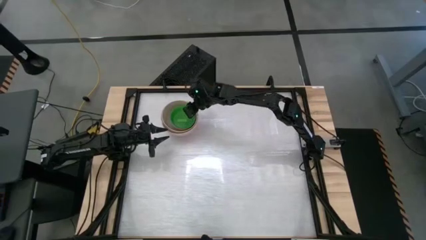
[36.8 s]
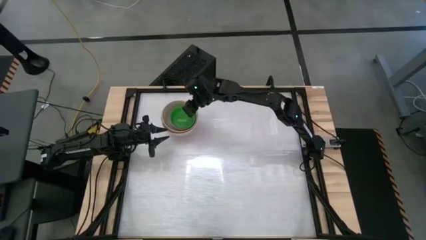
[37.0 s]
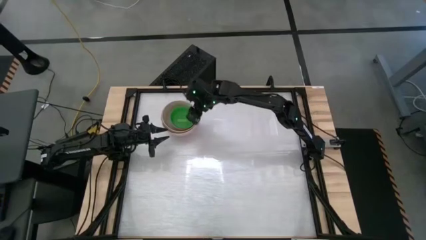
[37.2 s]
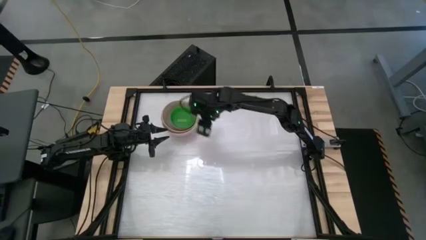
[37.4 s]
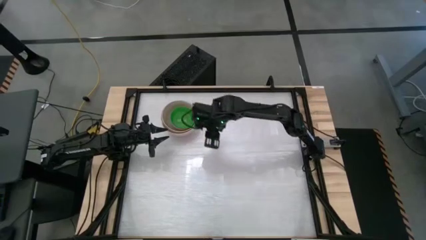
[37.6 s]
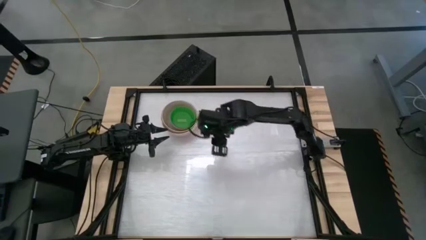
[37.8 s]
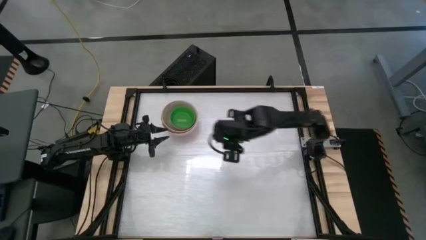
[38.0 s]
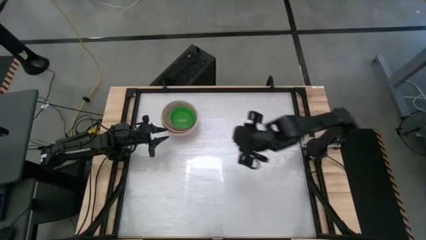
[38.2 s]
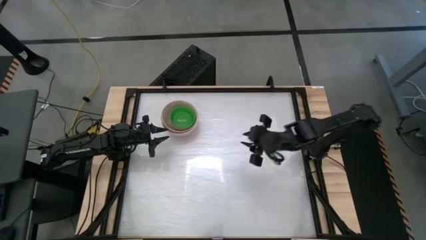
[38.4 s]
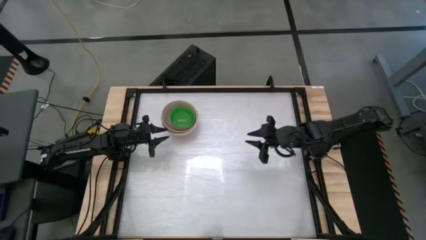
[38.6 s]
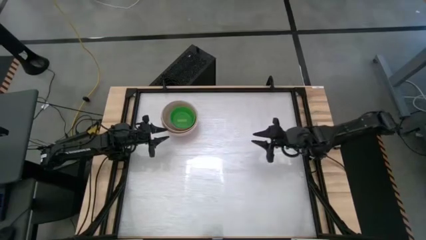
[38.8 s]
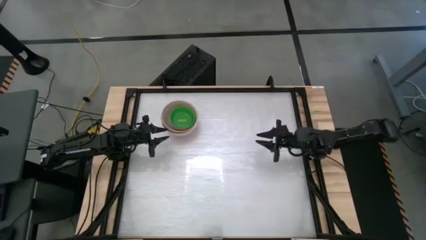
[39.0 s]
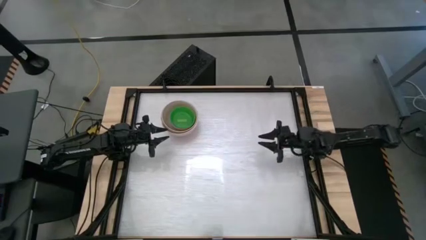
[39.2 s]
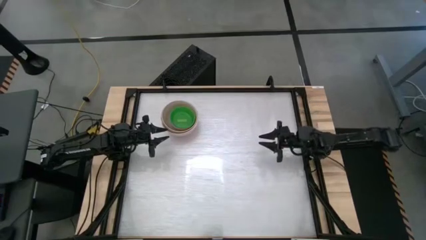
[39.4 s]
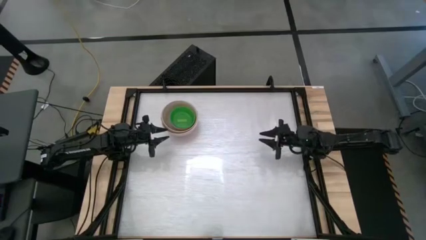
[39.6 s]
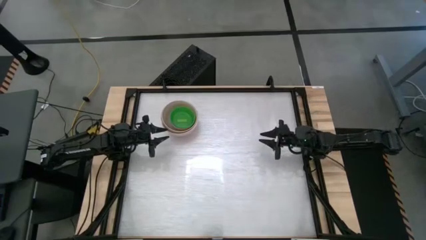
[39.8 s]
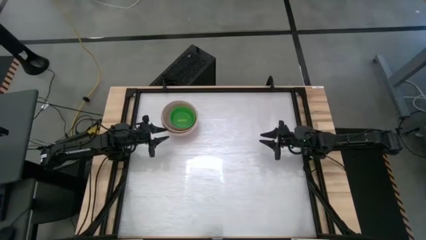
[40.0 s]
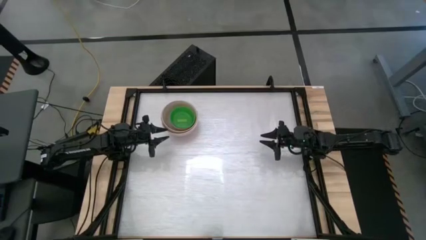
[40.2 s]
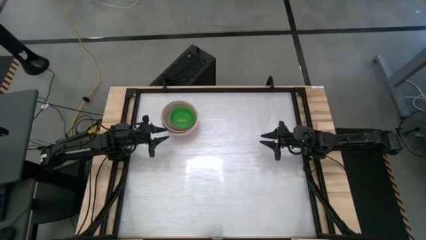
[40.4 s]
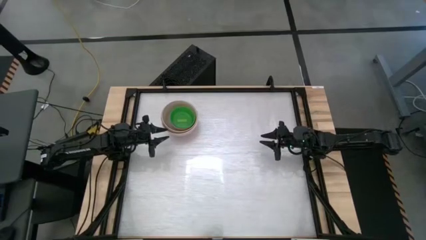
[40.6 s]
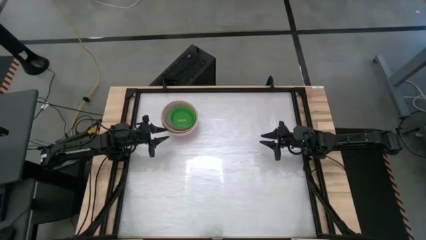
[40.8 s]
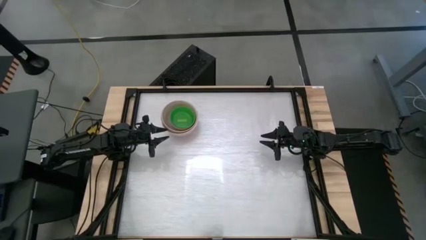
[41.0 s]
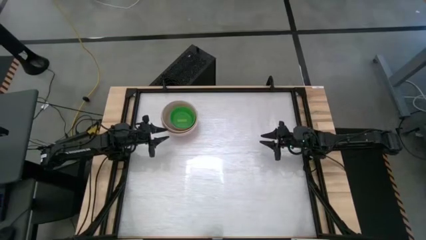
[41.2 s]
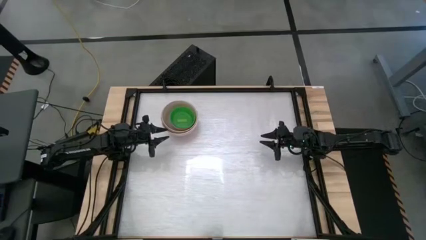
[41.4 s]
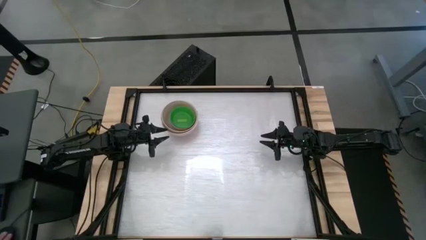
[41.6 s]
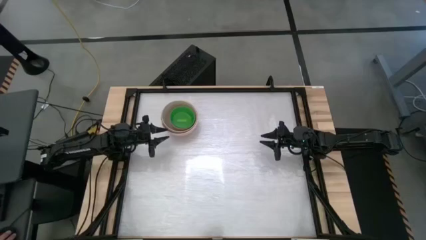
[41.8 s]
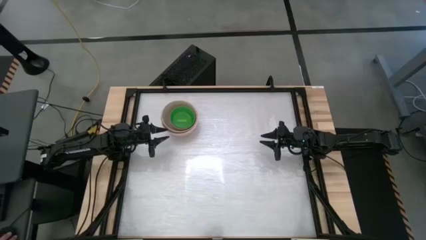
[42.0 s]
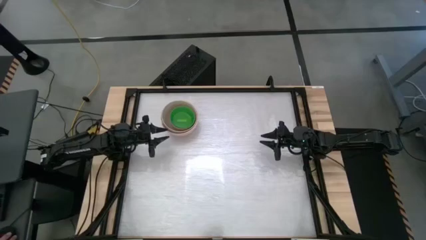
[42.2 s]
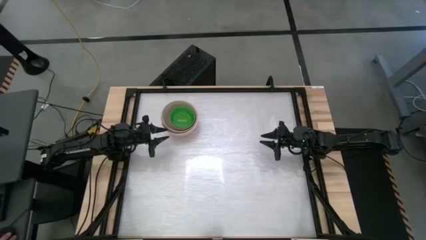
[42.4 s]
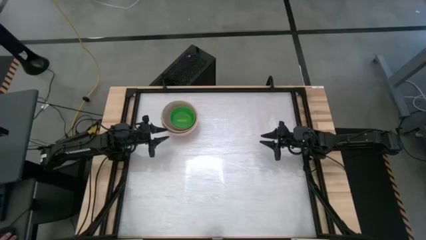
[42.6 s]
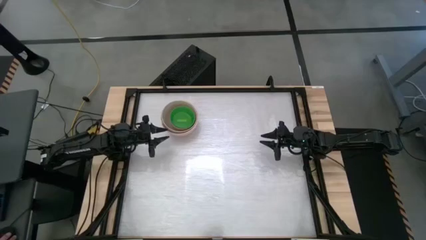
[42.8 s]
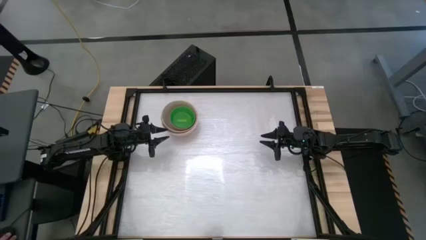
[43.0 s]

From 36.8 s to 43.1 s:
Return to Home Position

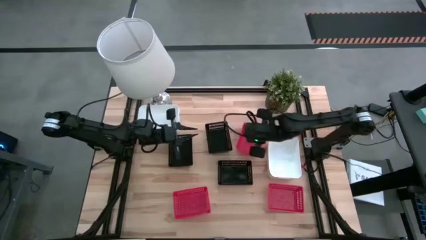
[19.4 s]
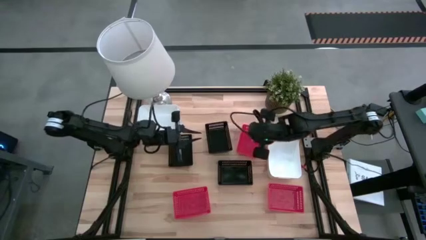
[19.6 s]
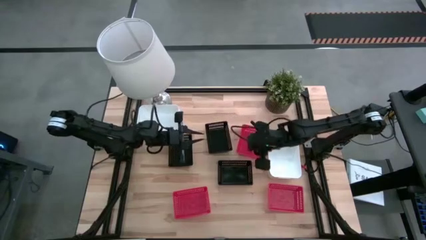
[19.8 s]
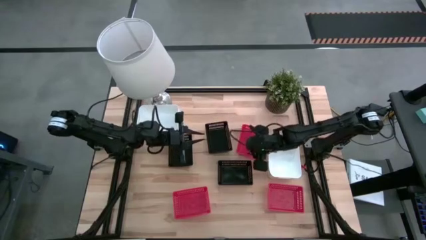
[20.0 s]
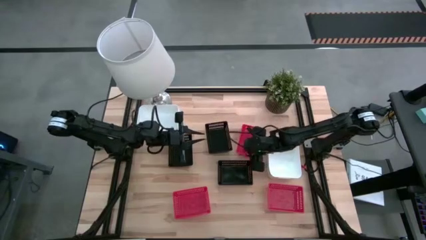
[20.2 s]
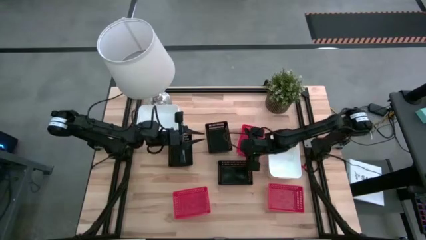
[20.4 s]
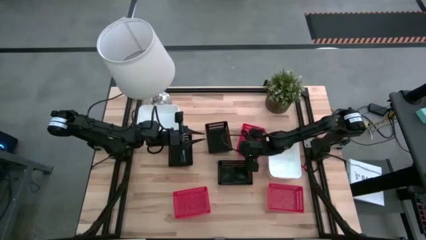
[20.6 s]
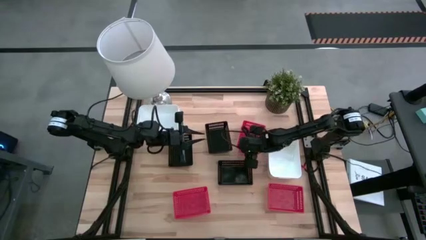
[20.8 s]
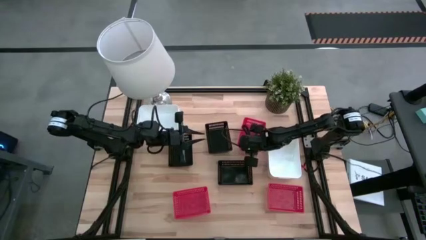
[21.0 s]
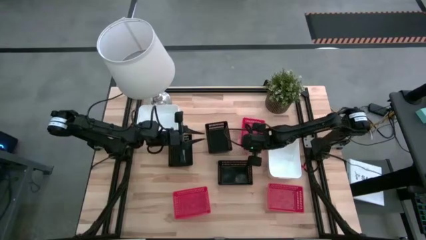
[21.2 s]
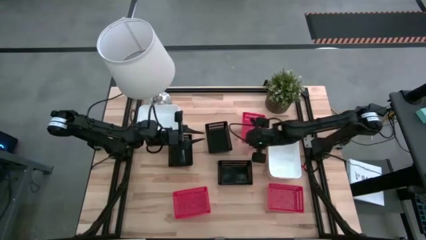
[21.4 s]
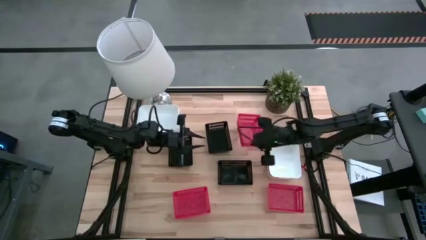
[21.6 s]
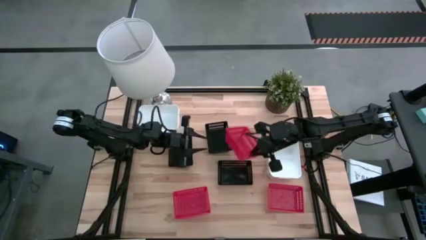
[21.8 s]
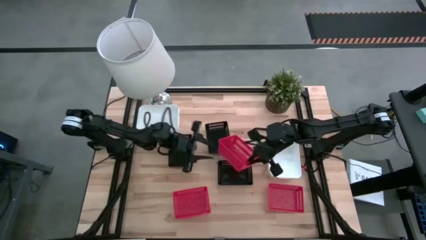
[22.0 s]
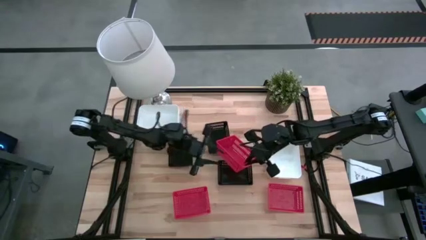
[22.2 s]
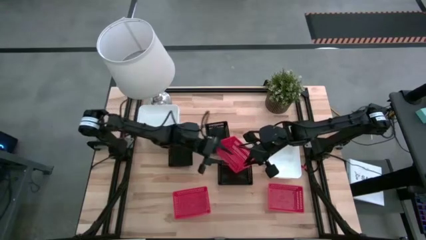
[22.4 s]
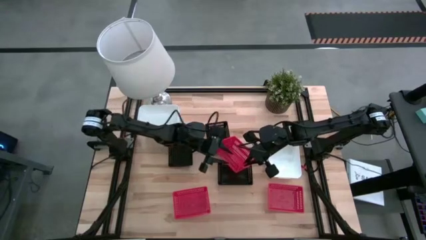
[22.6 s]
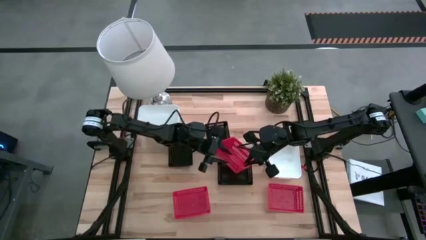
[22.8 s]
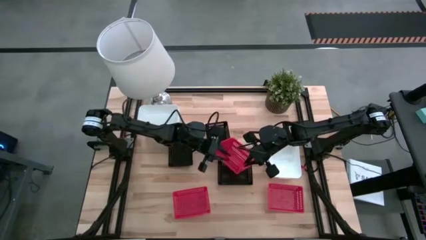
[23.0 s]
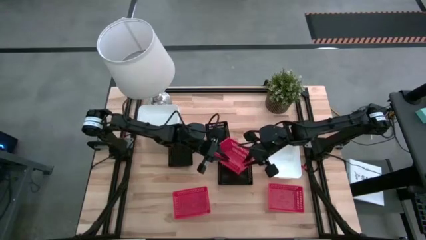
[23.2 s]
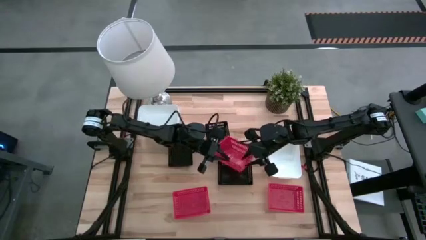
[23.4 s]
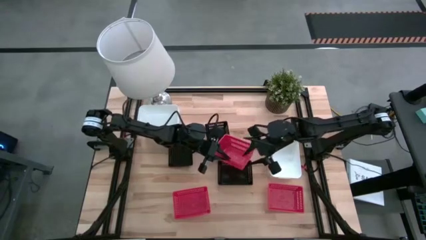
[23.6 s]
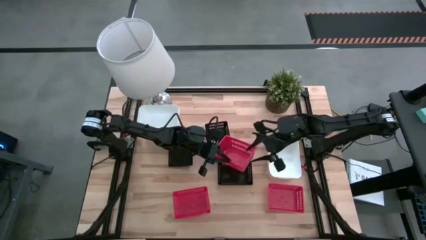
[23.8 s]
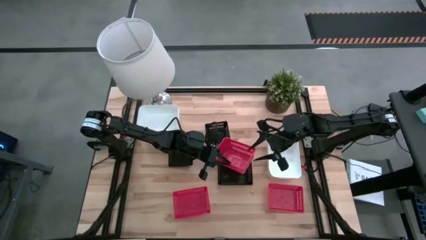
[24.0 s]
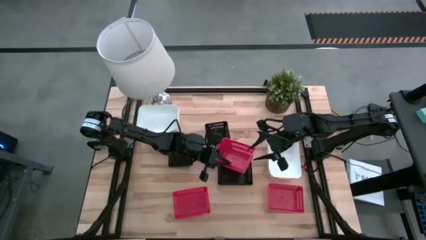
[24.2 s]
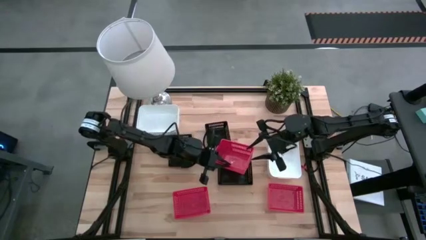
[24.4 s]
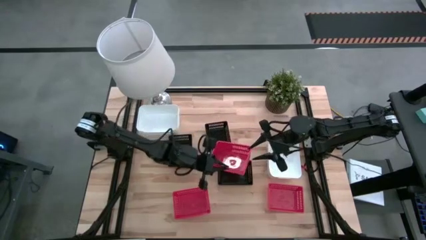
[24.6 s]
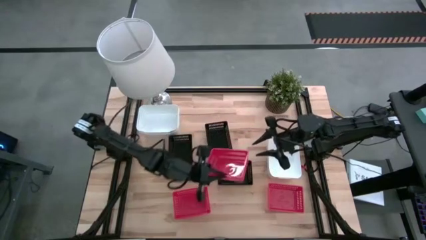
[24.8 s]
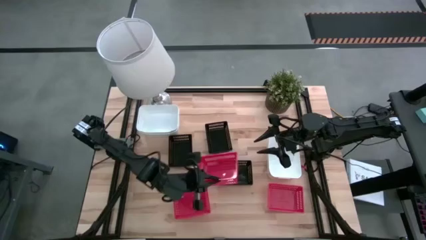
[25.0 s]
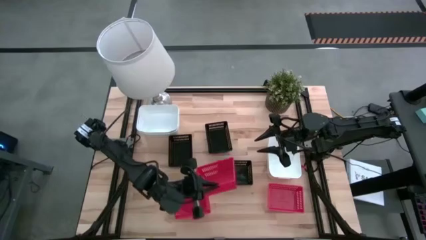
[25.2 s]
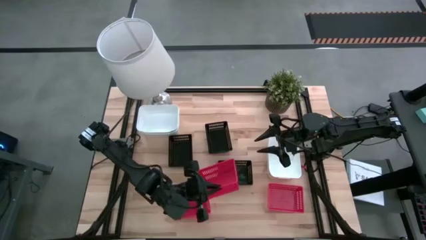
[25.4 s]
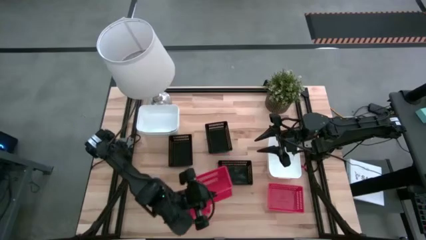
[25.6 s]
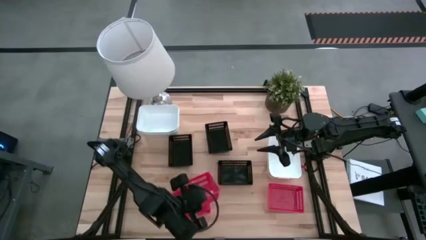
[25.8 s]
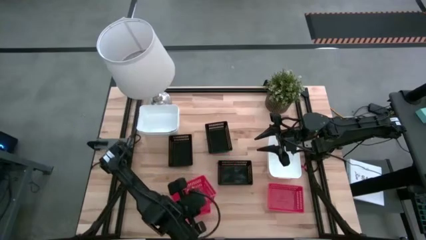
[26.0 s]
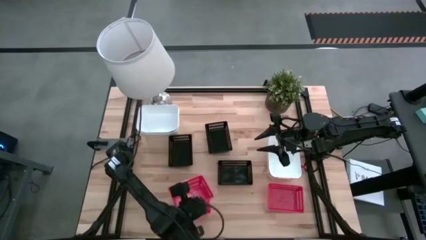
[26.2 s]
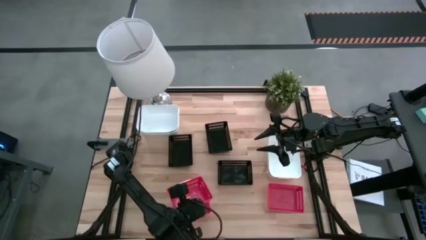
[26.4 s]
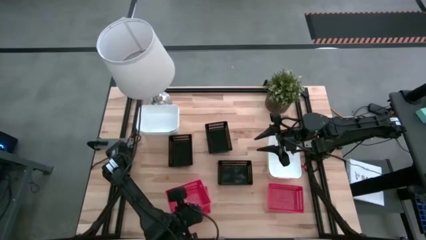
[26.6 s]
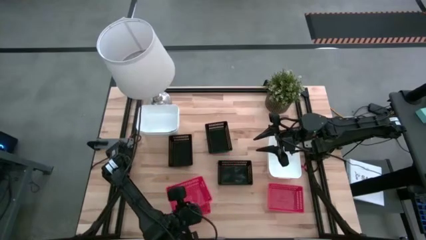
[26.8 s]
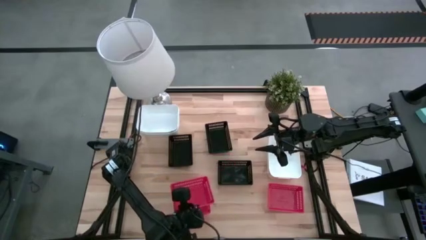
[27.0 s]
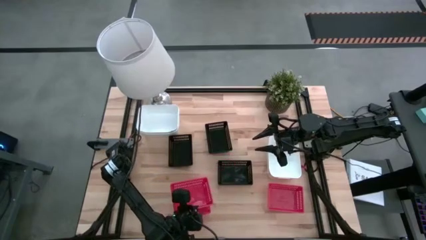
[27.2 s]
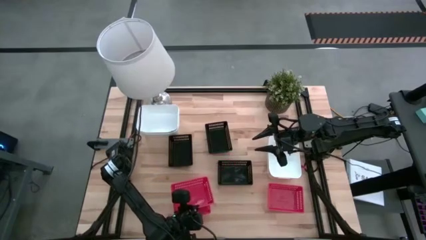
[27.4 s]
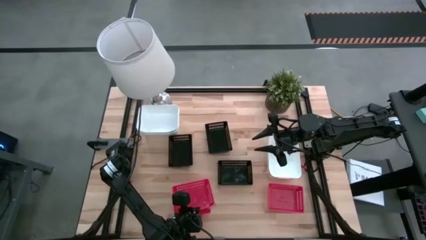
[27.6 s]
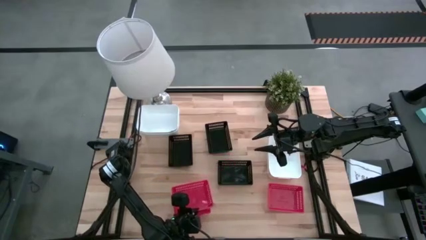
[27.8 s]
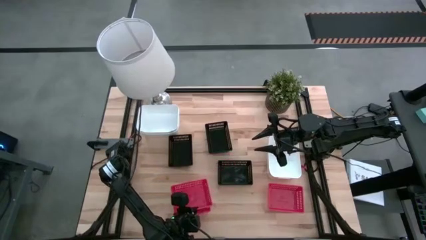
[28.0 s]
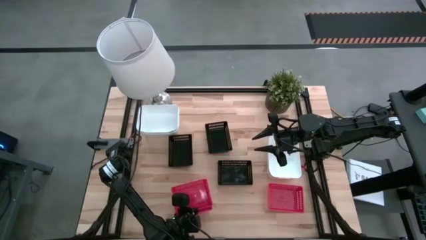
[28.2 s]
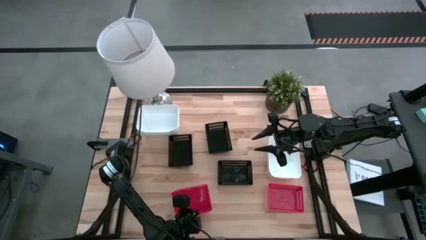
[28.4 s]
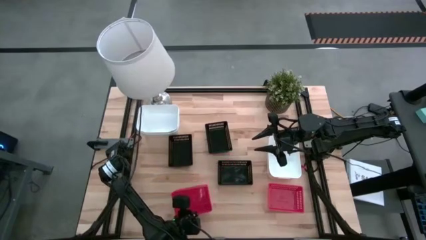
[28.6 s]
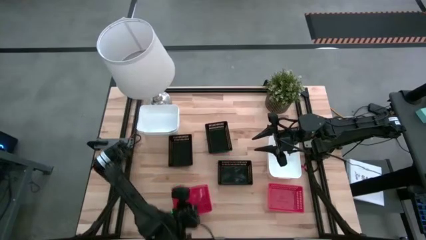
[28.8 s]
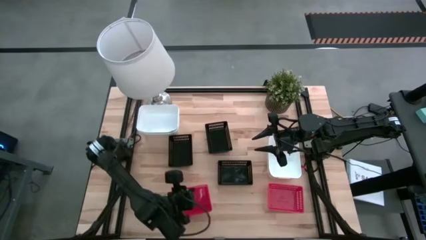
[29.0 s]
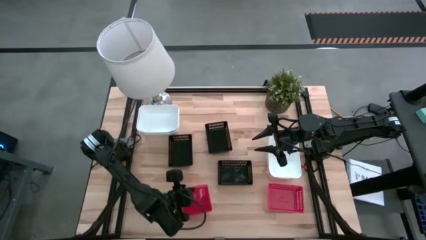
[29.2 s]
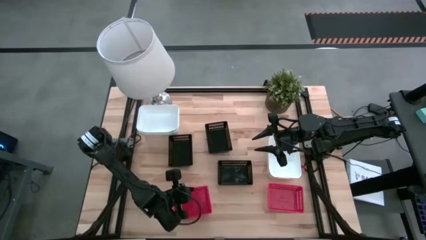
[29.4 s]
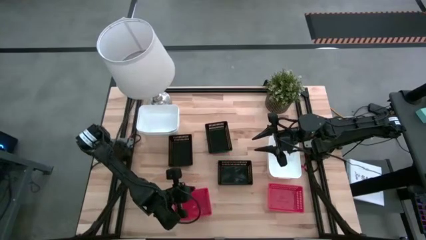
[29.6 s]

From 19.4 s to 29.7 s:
Stack the top red bin on top of the bottom left red bin
